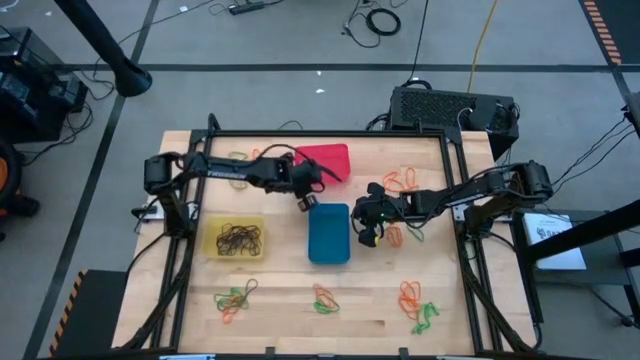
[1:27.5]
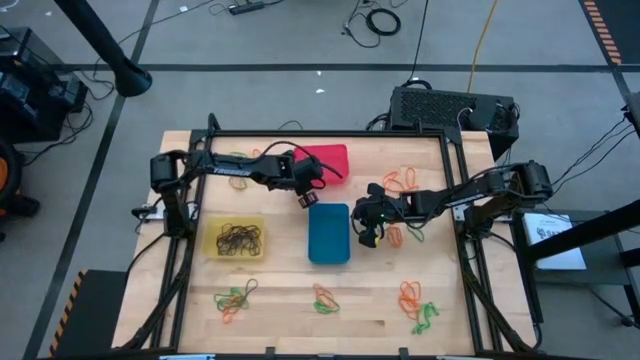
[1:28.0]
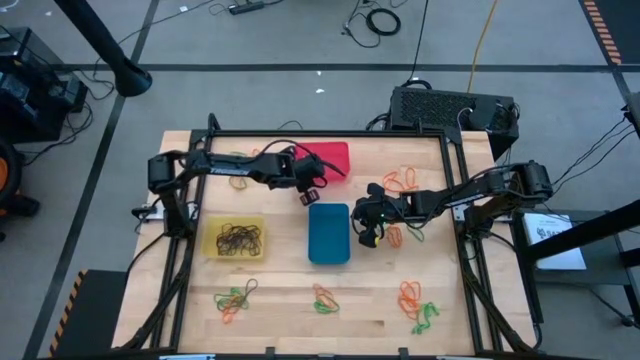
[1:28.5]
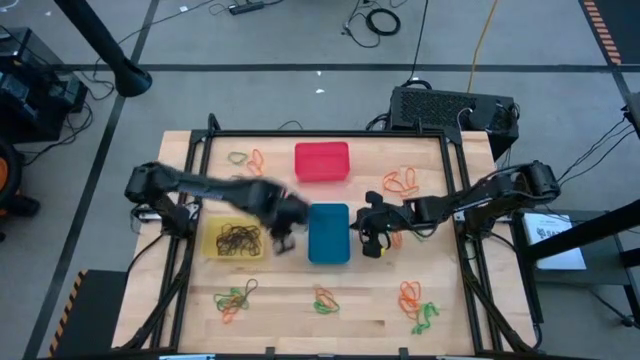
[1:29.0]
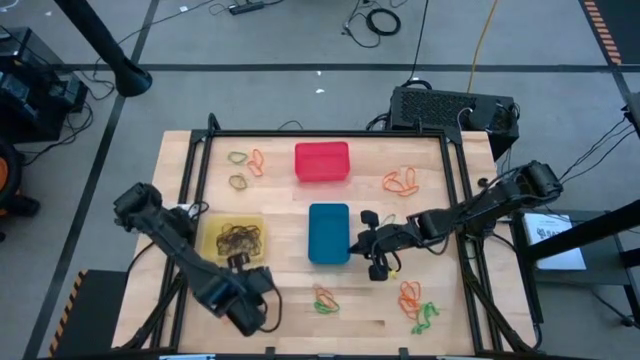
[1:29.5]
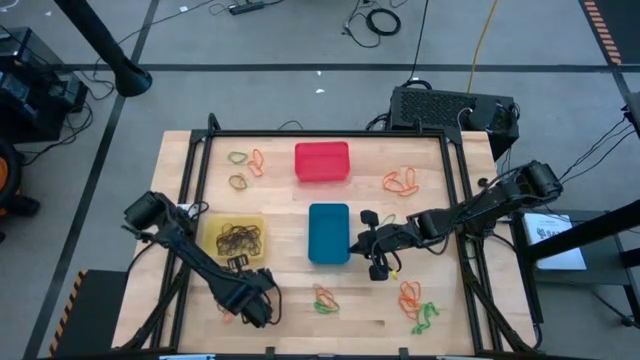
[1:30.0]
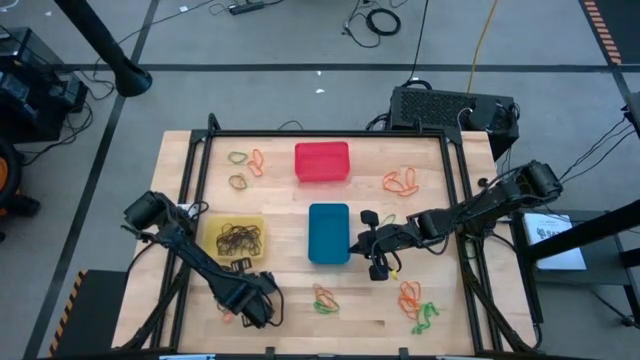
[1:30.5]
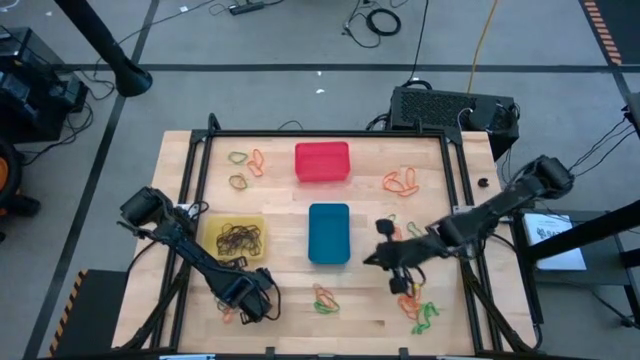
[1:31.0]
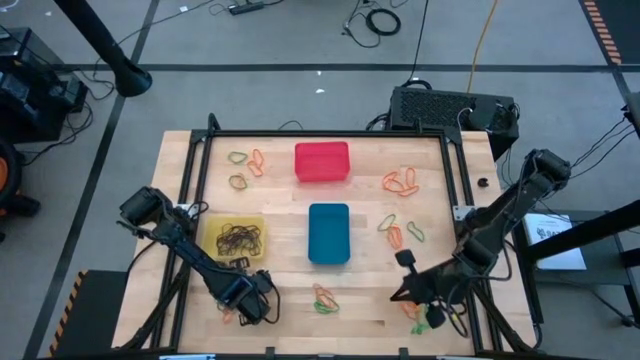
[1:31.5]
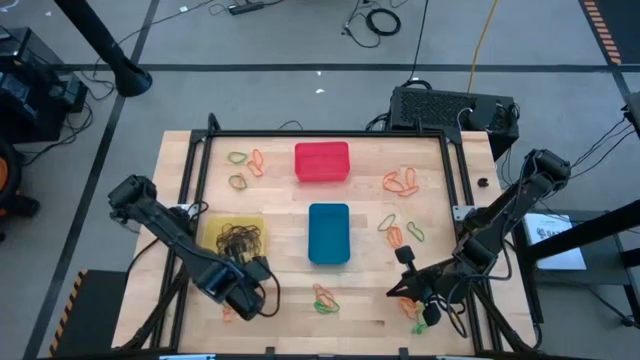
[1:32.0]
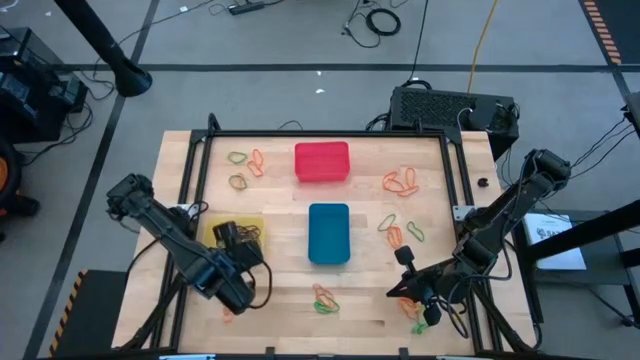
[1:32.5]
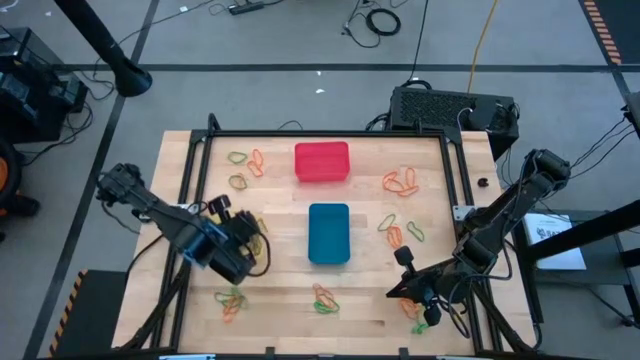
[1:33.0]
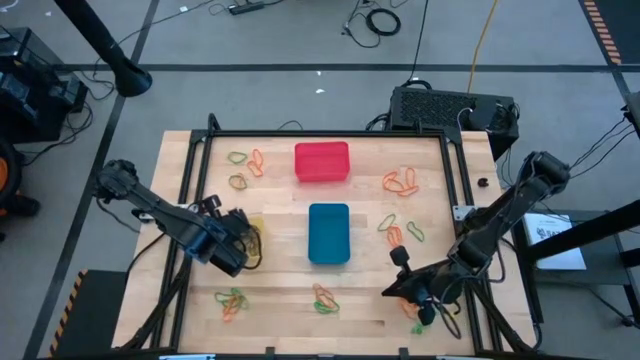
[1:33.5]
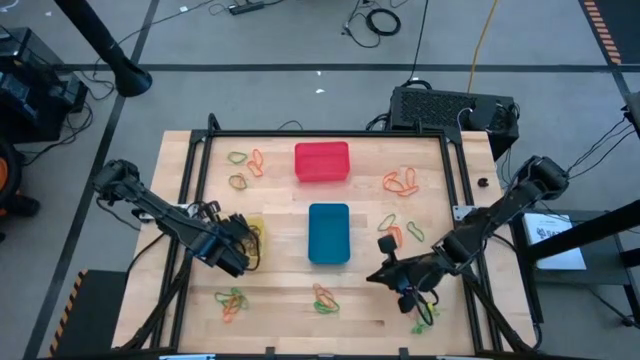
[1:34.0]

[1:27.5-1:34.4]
Task: Sort rubber bands into baskets
Put the purple rubber band into the yellow bin

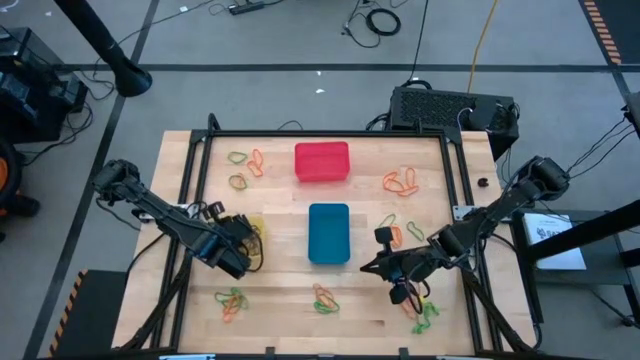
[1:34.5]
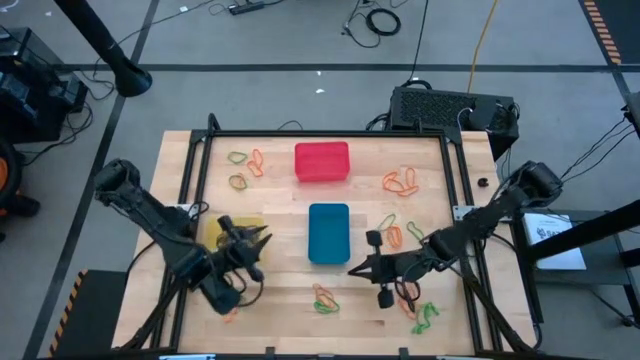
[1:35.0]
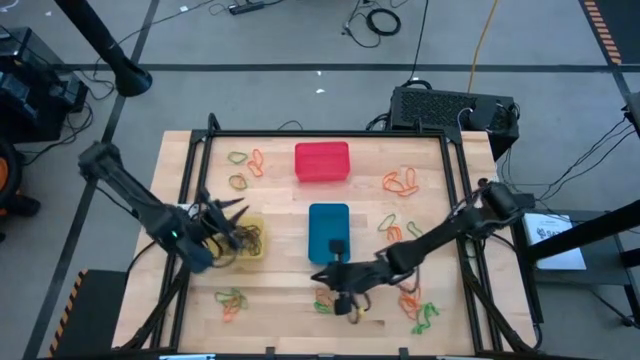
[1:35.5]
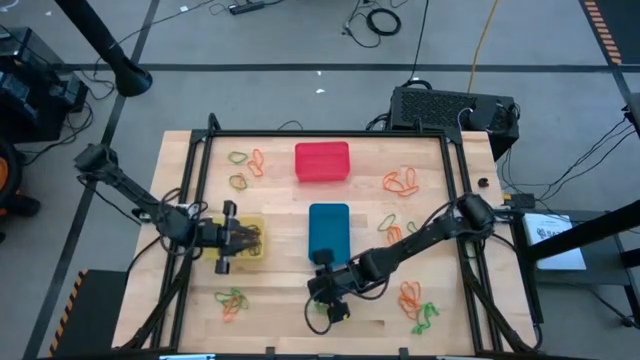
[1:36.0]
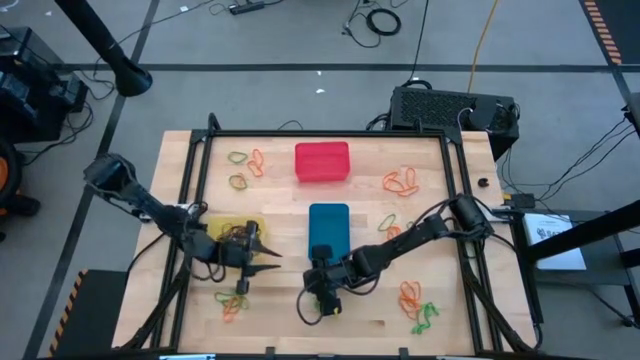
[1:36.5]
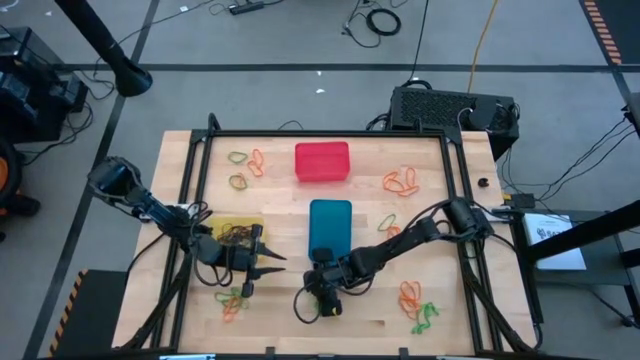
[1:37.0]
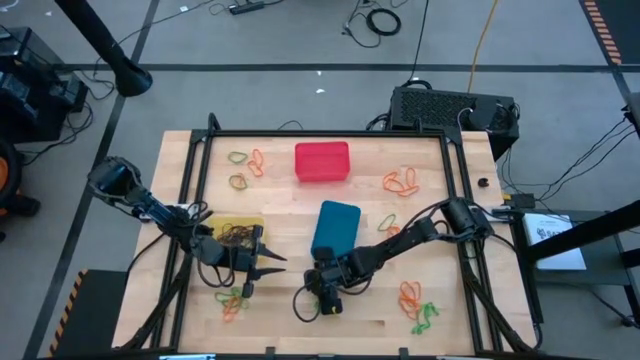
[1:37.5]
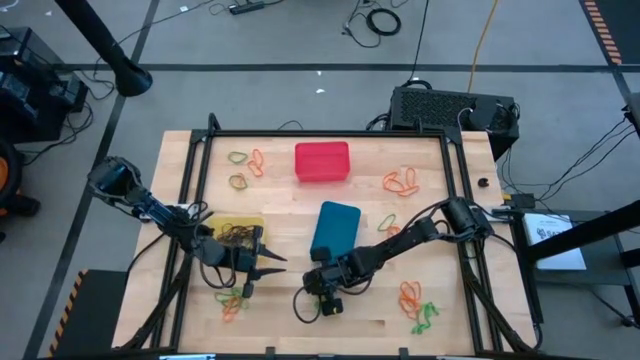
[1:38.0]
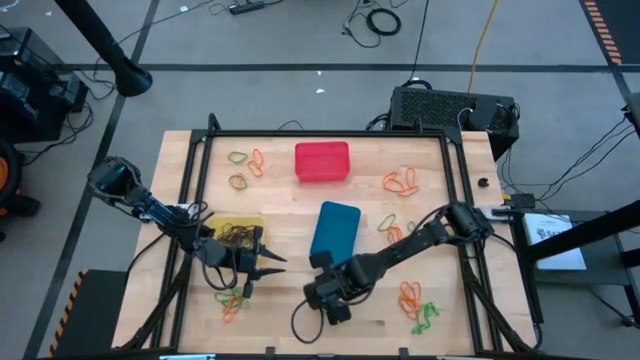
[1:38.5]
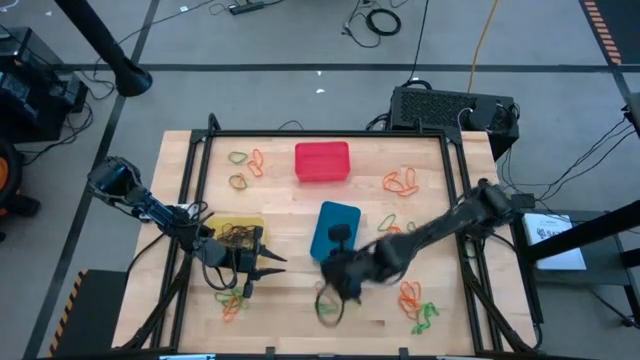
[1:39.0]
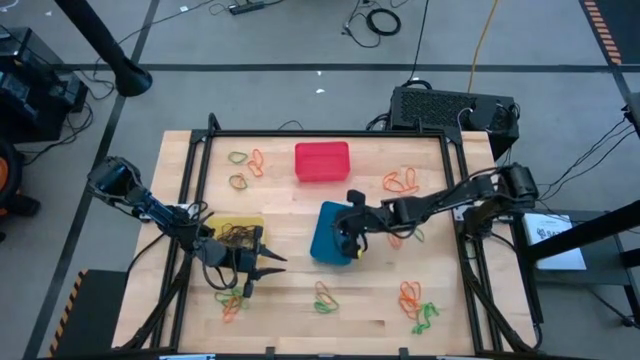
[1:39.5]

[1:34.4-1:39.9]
Put the orange rubber band into the blue bin

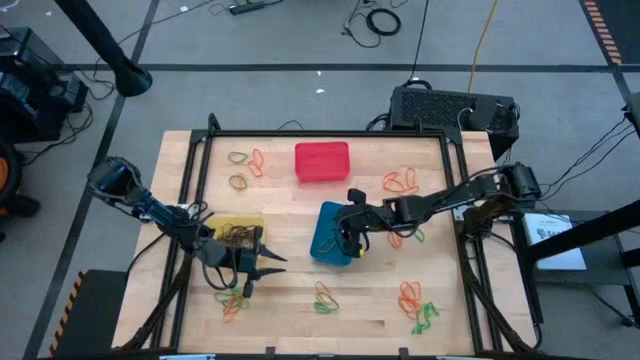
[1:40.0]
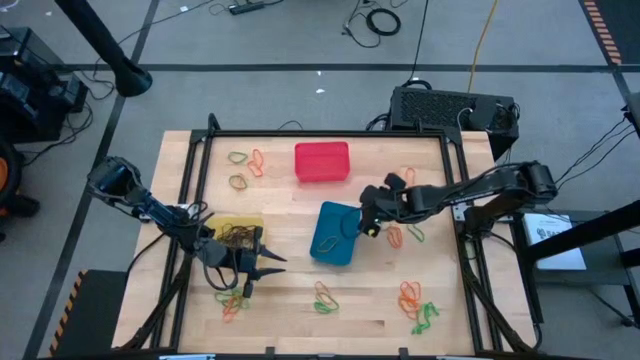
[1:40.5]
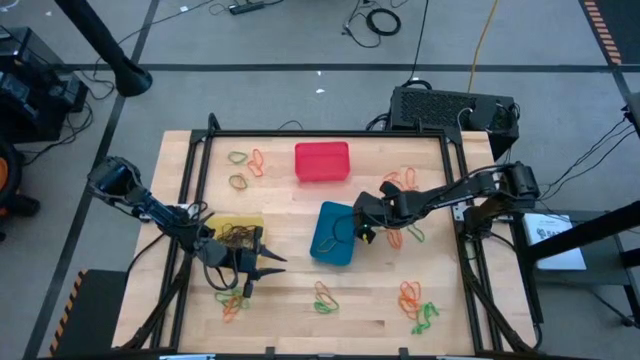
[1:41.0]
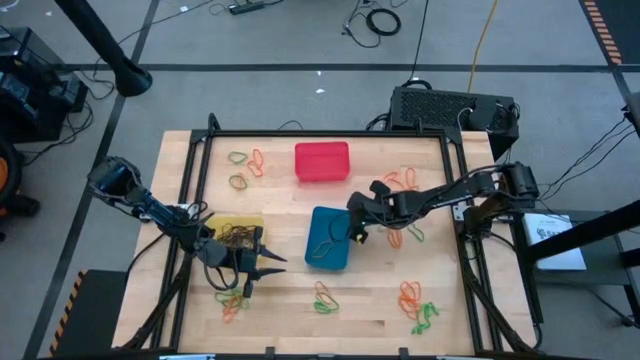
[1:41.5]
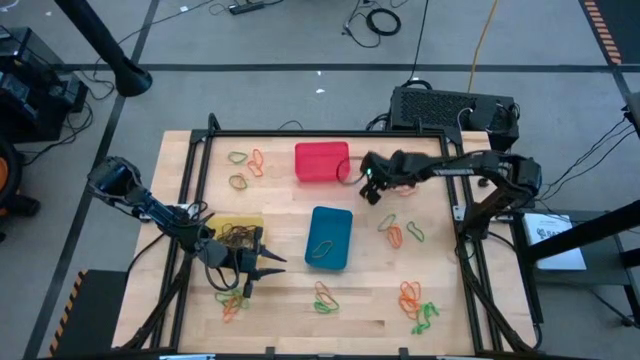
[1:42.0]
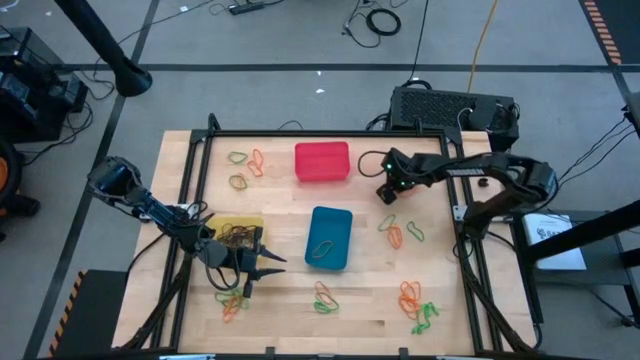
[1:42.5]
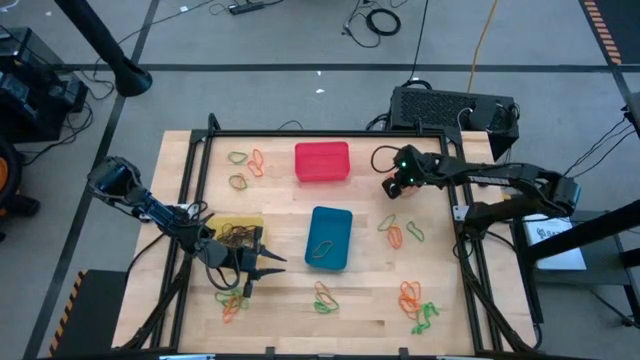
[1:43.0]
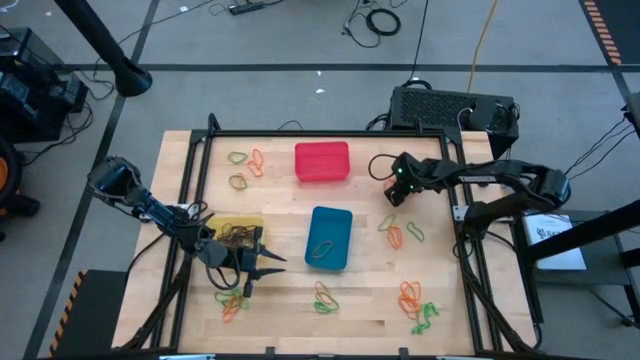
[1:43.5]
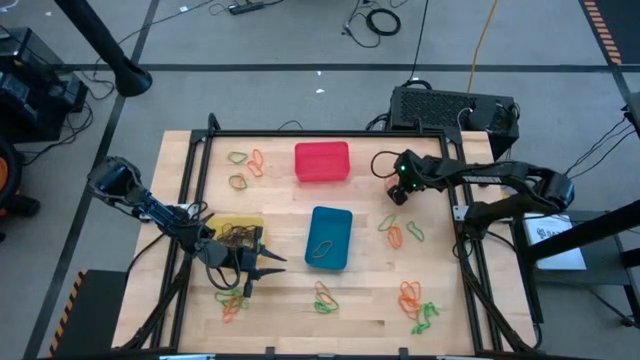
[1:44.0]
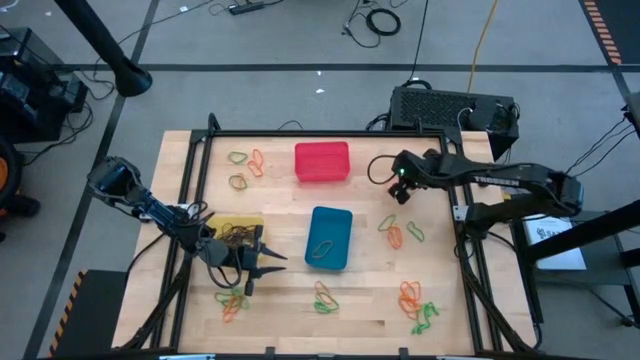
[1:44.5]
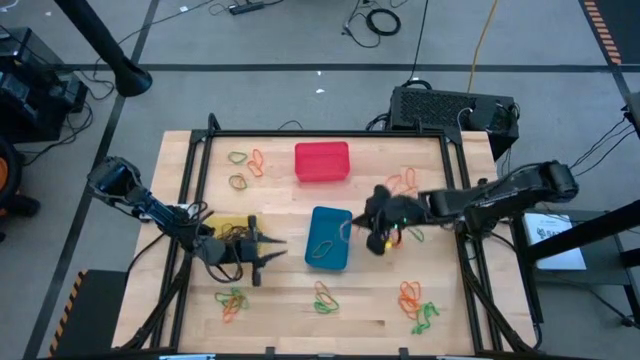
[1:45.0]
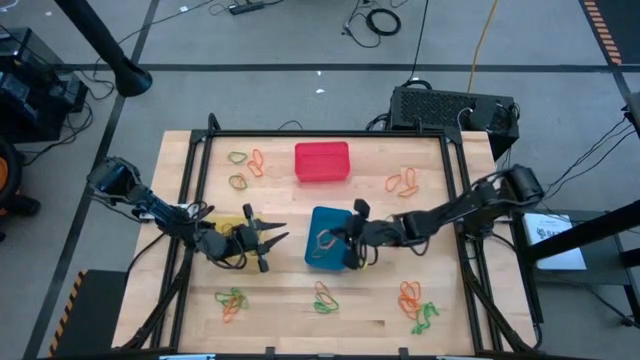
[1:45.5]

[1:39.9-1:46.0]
Put the orange rubber band into the blue bin

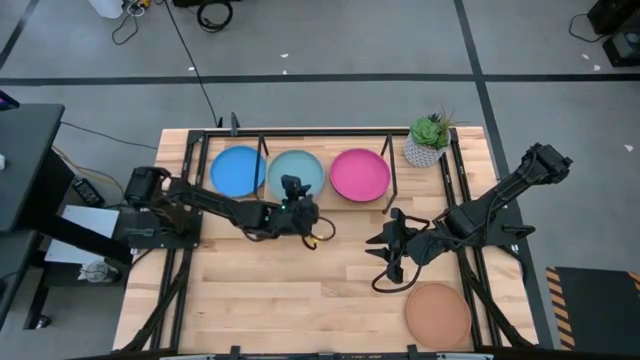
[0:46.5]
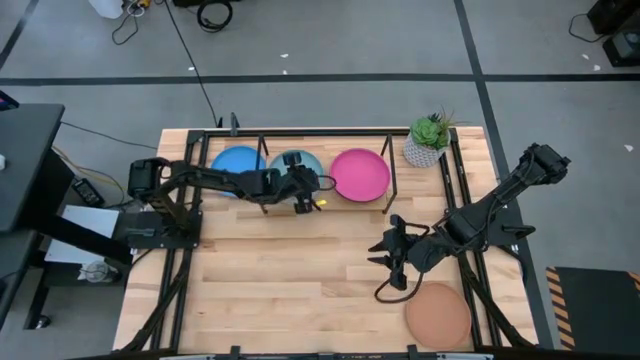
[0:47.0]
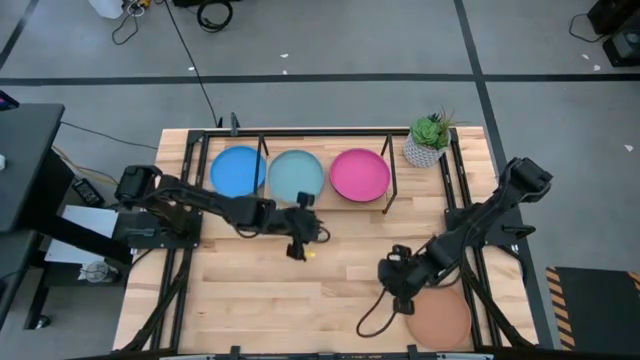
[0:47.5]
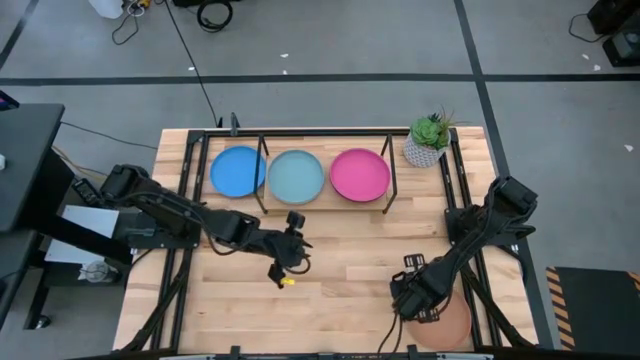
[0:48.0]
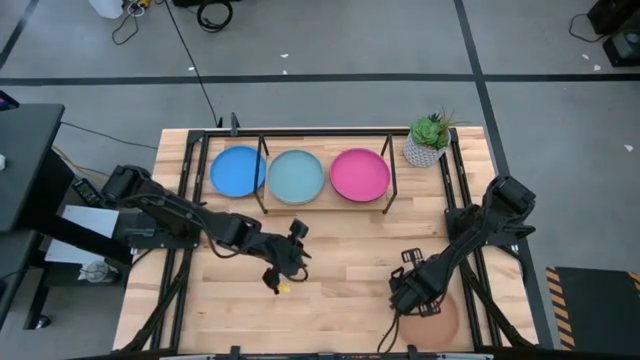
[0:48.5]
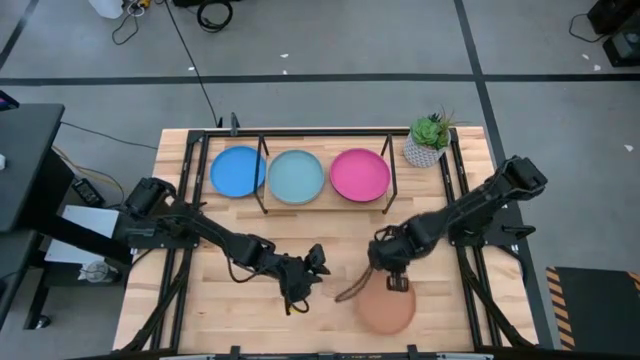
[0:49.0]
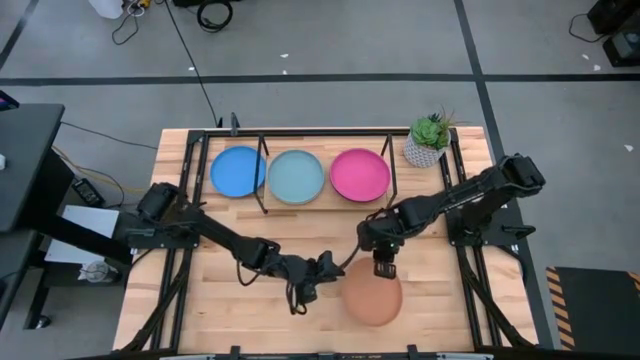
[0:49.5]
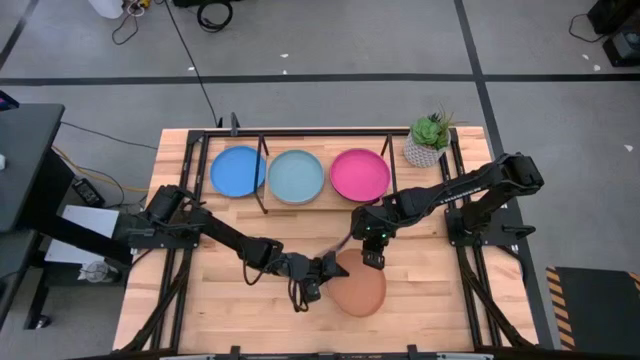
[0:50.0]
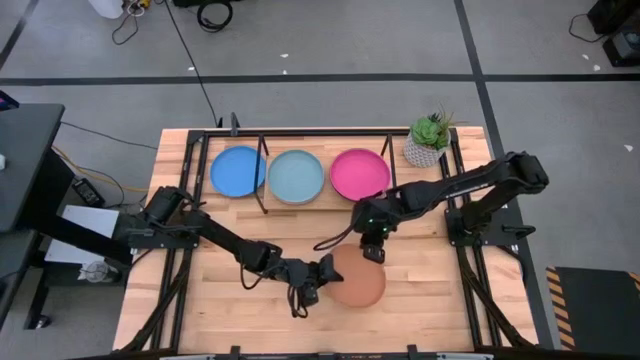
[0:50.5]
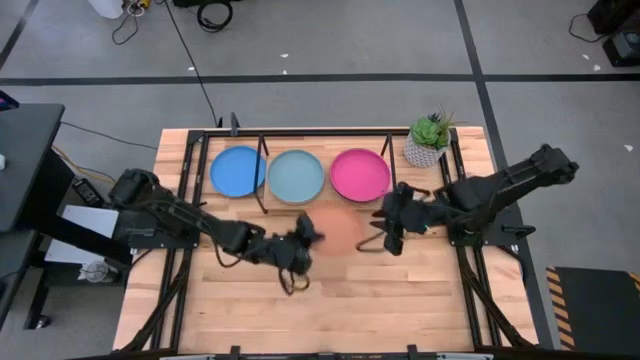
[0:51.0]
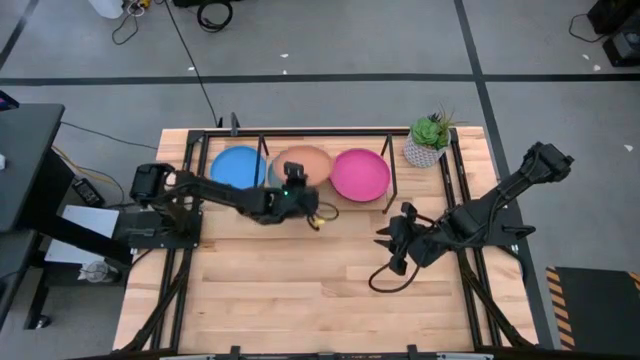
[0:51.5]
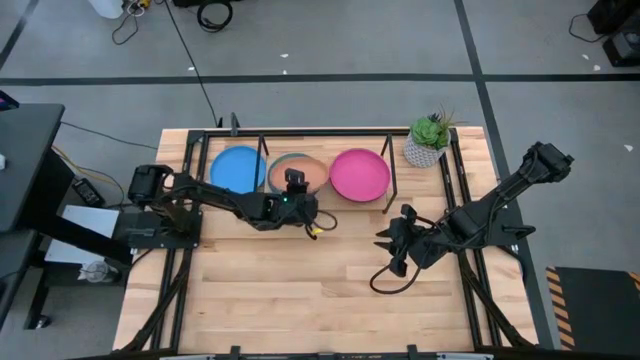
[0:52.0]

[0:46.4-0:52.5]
Task: Place and stack plates onto a shelf
Stack the brown plate on top of the light blue plate on the shelf
